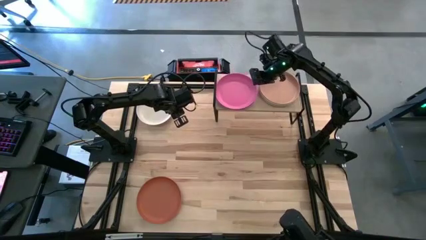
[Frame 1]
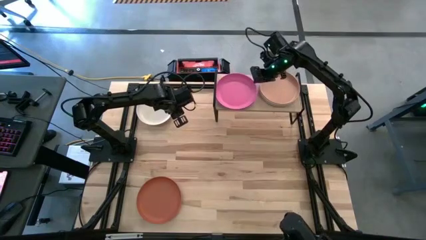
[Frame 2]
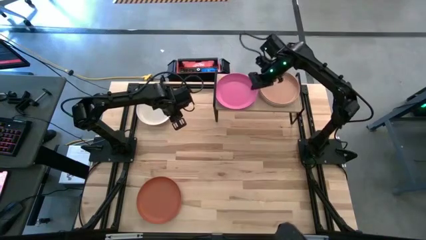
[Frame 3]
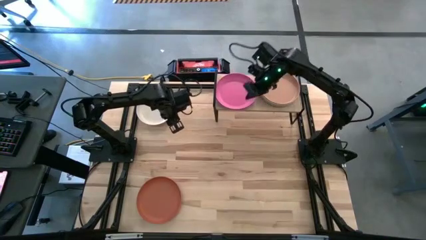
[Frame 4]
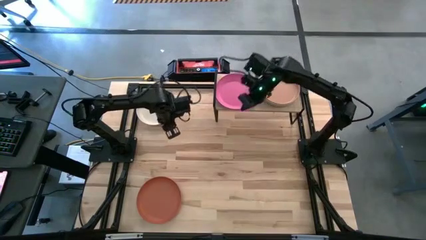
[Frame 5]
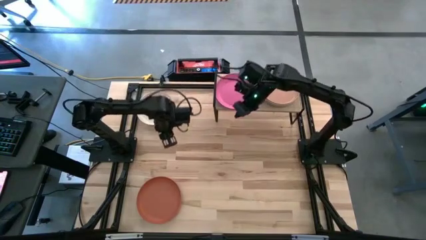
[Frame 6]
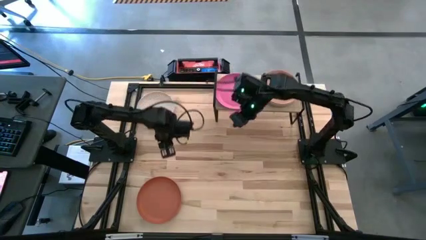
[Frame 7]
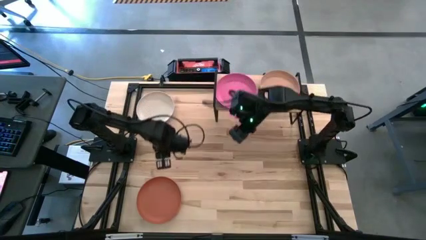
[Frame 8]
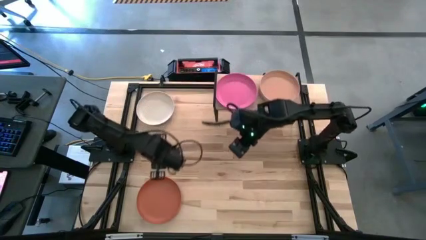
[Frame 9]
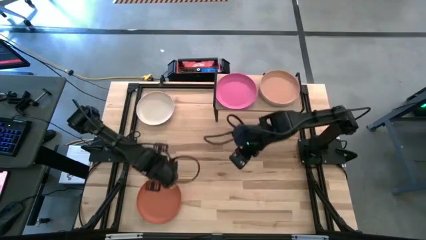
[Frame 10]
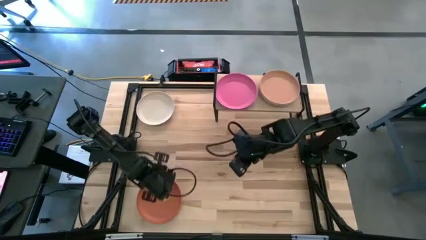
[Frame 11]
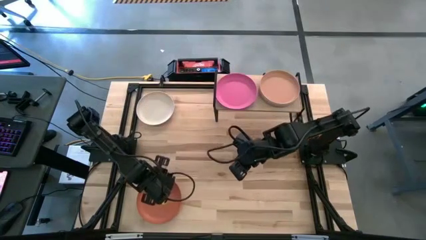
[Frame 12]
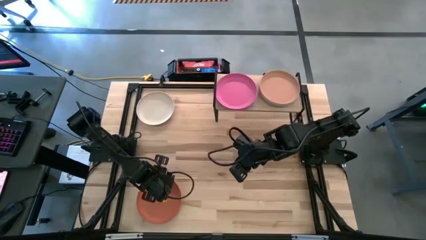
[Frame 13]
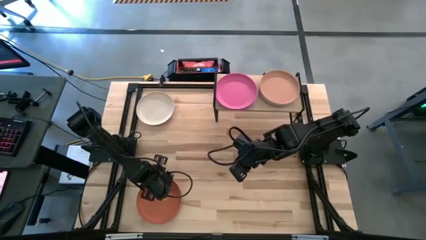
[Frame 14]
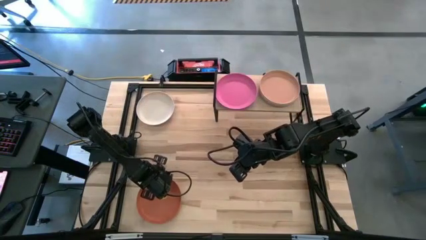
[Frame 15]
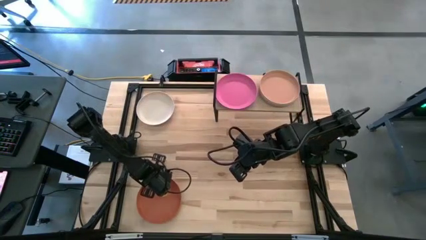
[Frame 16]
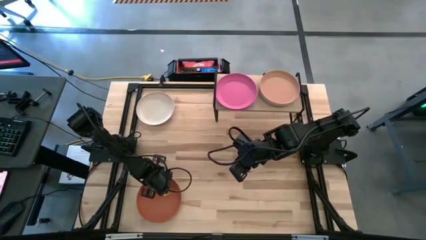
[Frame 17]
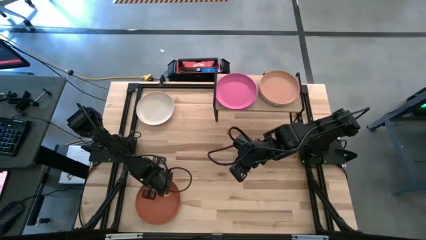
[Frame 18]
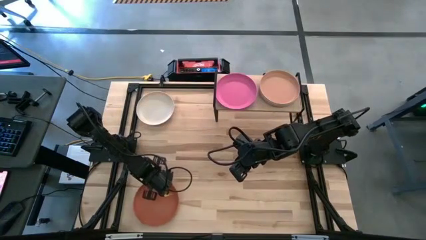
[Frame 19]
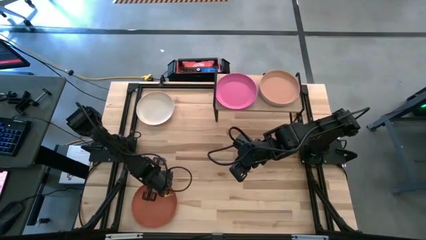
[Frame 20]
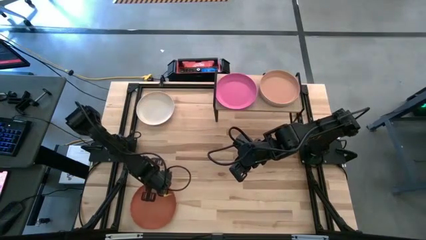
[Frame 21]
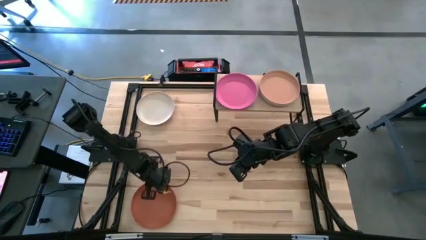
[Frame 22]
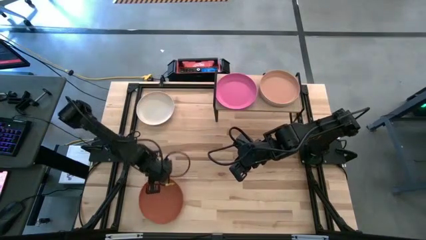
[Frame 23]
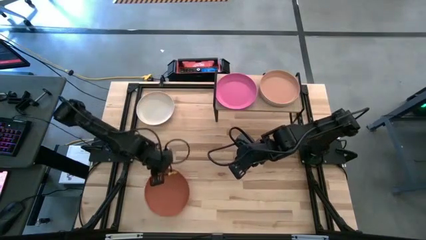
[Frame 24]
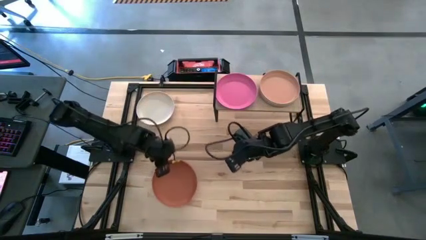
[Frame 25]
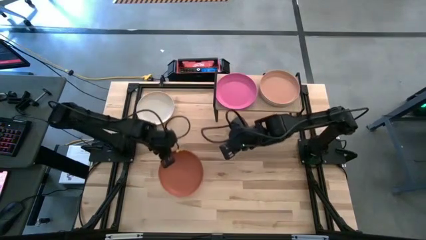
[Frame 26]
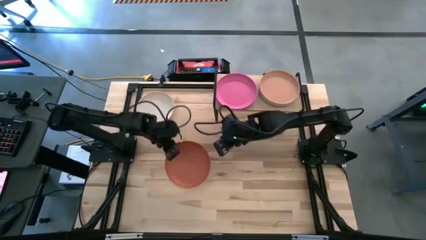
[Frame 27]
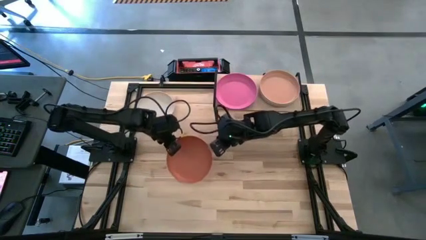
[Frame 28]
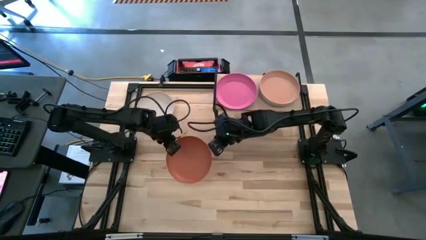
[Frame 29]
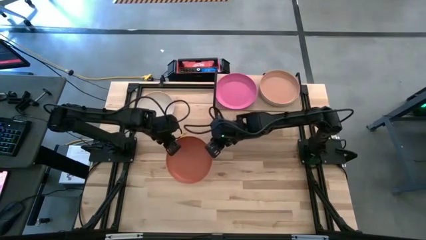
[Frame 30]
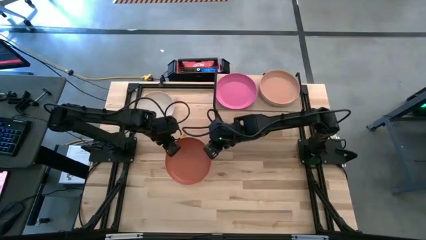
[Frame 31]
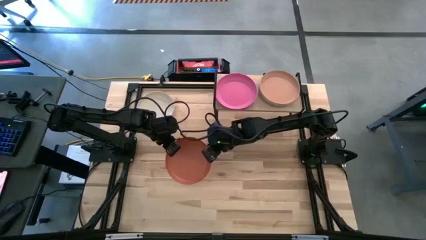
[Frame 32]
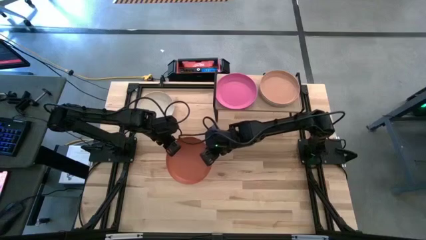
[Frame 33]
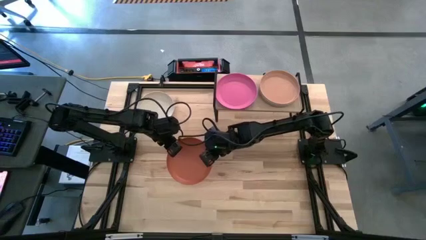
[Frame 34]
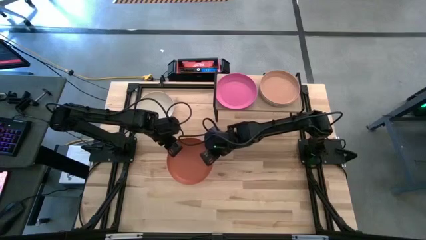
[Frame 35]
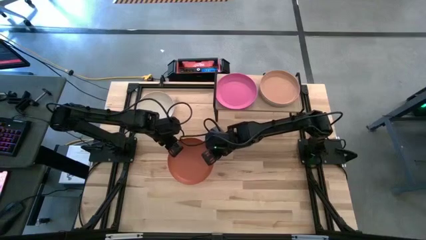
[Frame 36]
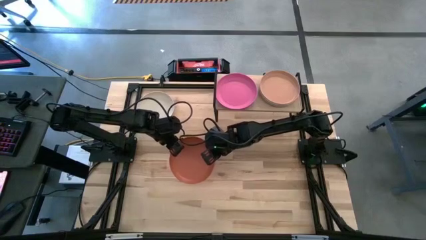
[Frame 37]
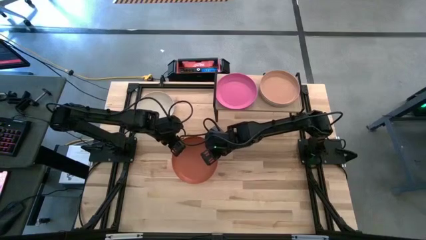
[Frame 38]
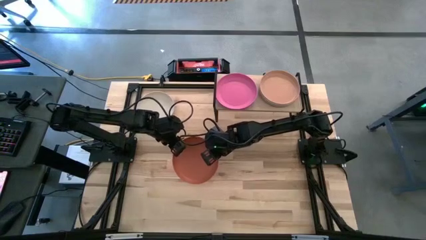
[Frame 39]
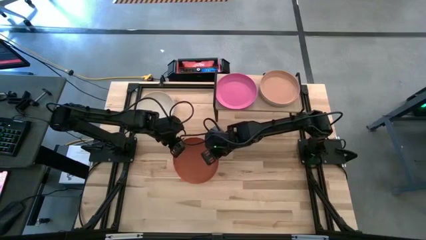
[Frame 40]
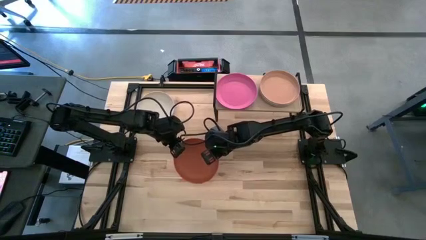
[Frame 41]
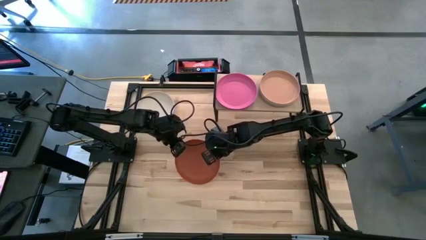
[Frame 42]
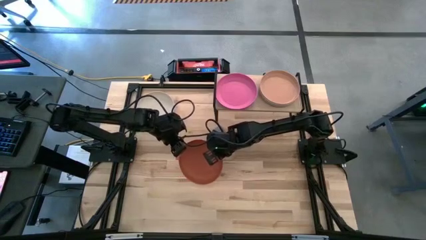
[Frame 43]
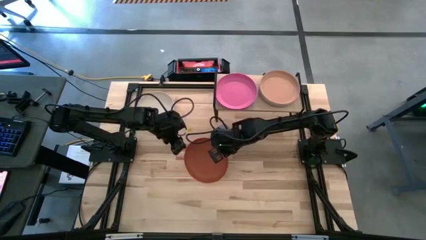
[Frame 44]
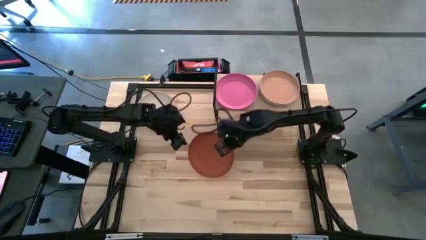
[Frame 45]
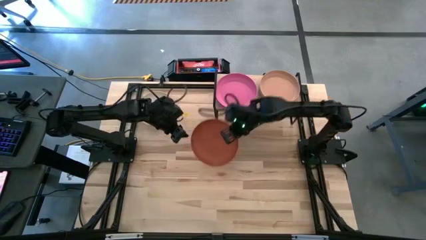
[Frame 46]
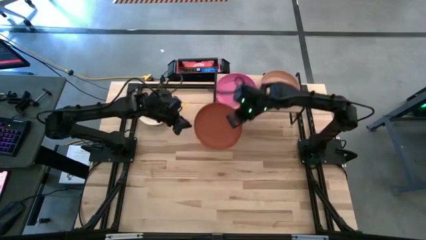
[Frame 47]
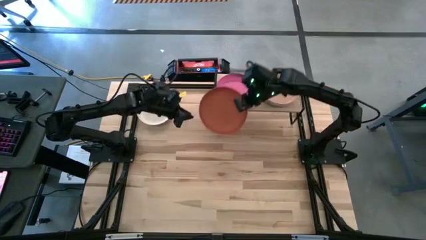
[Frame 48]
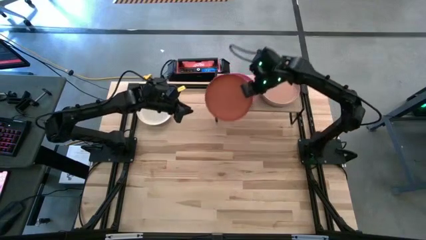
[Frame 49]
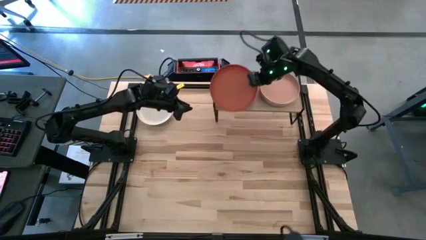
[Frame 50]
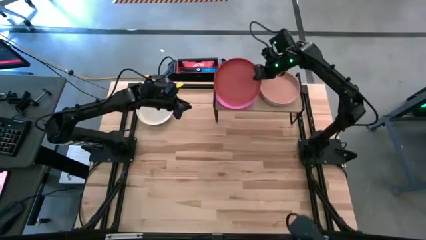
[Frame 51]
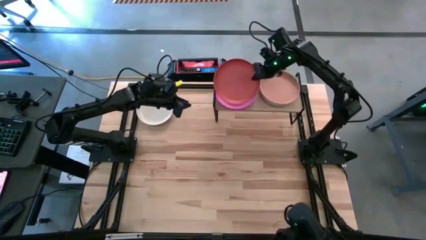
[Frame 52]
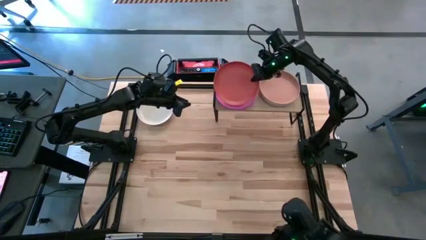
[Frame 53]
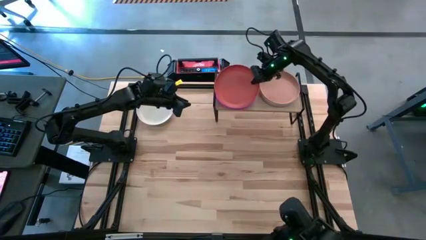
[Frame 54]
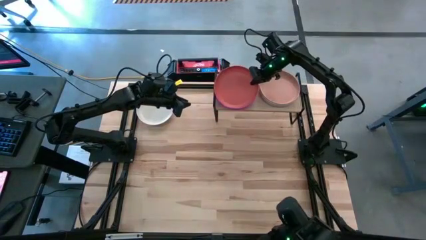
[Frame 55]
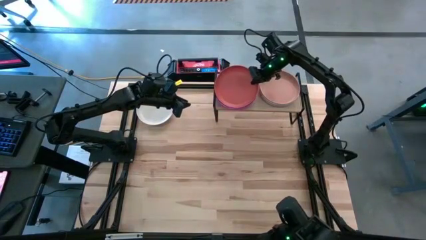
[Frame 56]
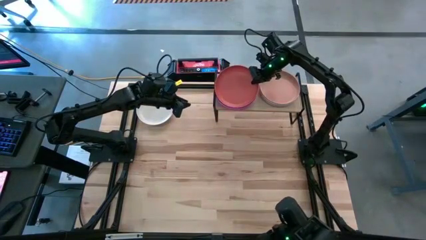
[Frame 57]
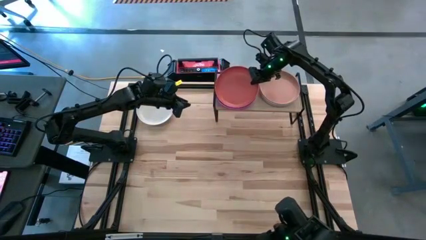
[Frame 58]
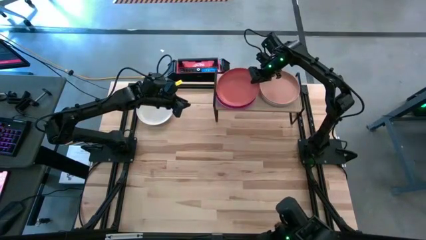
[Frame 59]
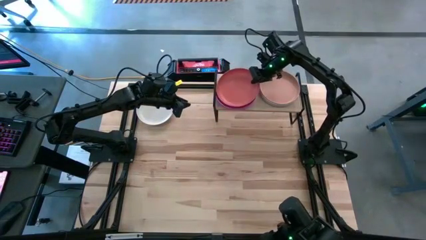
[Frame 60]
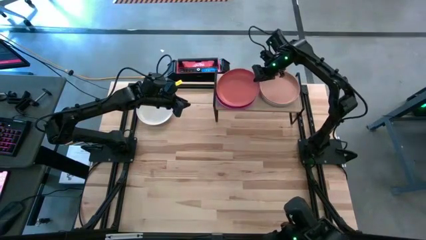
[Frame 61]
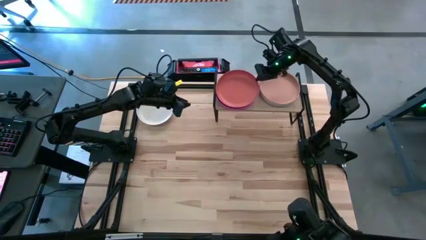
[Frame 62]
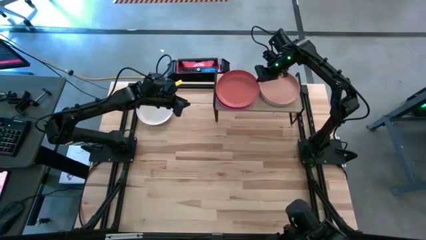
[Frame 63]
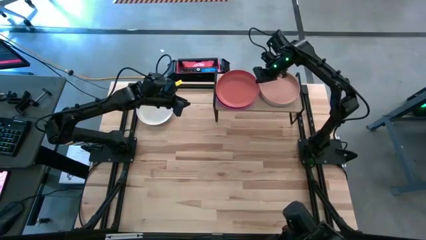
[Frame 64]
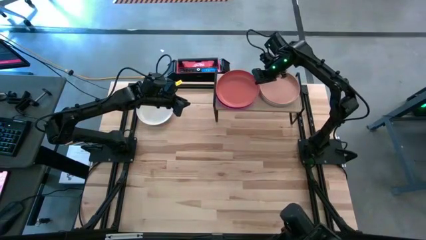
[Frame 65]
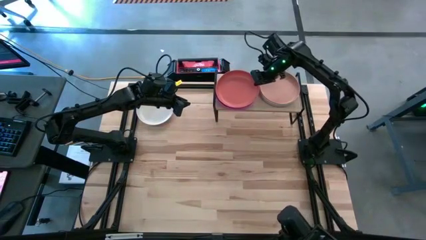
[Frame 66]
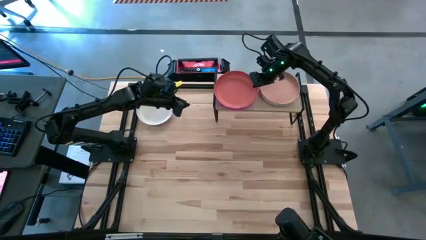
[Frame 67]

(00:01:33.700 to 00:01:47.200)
Task: Place and stack plates onto a shelf
Stack the dark orange plate on top of the pink stacked plates on the shelf

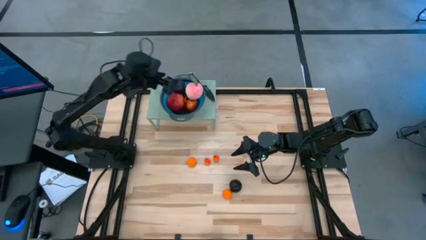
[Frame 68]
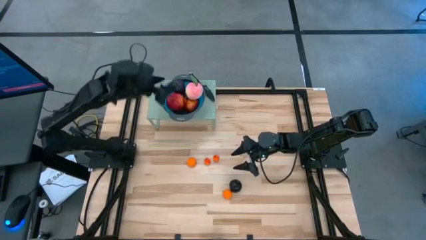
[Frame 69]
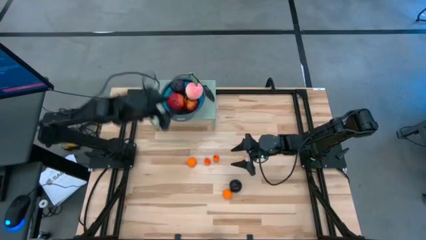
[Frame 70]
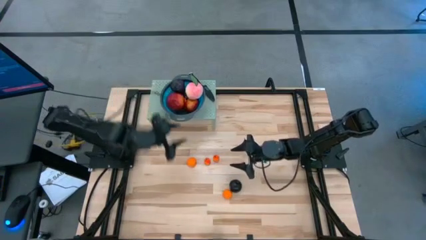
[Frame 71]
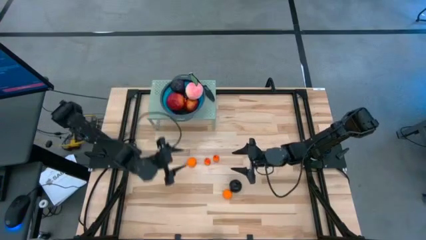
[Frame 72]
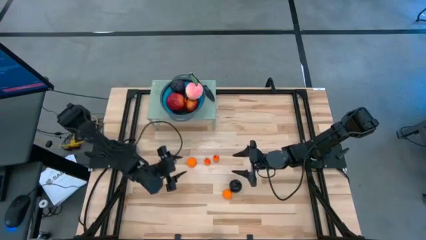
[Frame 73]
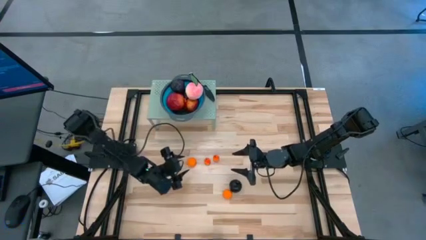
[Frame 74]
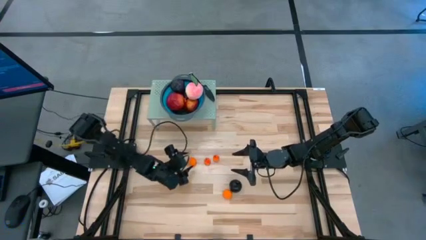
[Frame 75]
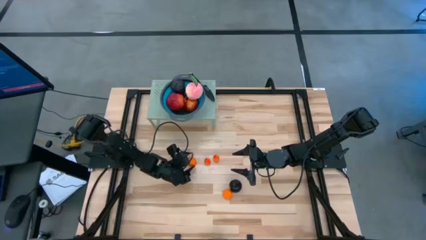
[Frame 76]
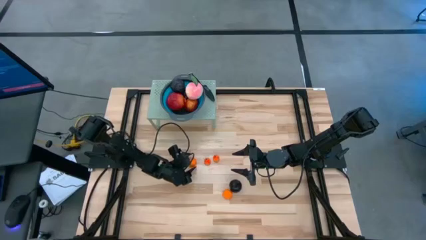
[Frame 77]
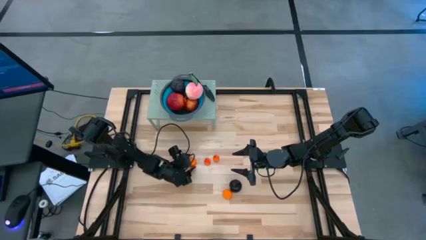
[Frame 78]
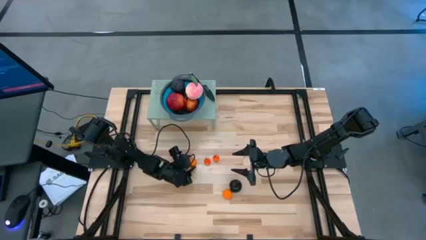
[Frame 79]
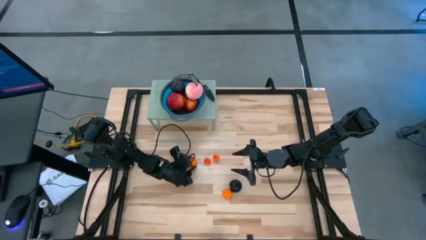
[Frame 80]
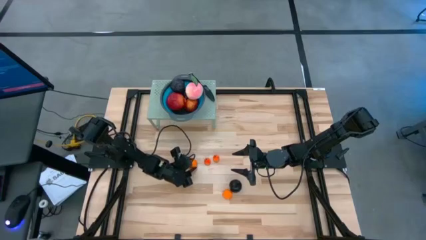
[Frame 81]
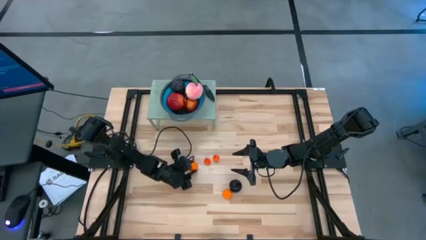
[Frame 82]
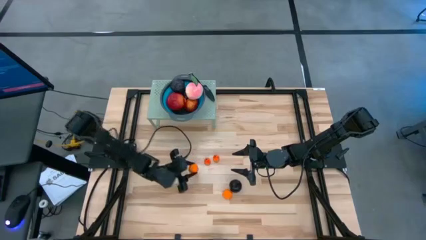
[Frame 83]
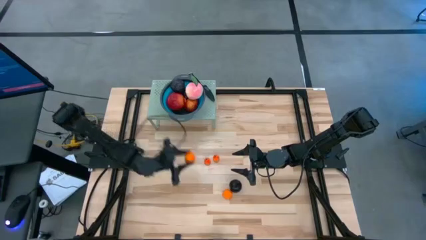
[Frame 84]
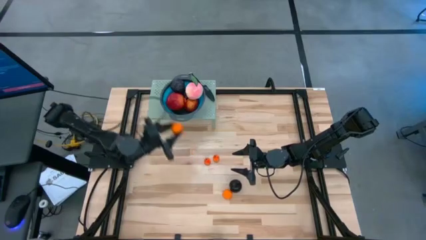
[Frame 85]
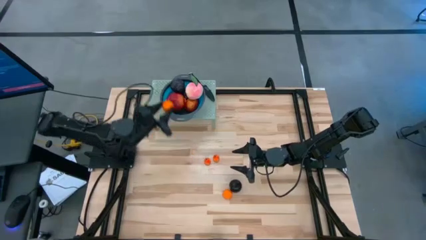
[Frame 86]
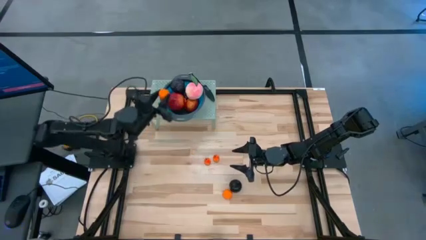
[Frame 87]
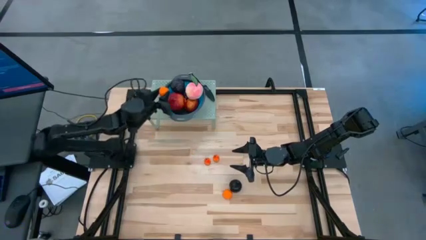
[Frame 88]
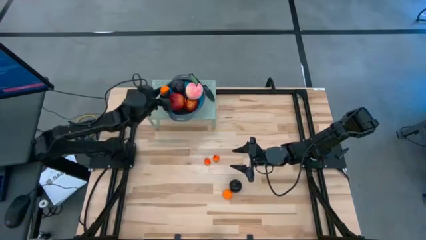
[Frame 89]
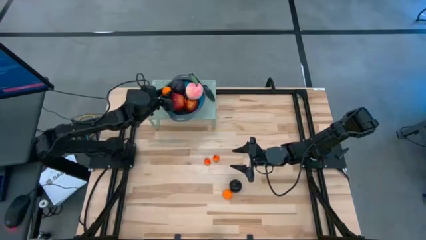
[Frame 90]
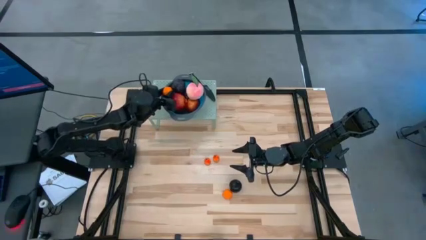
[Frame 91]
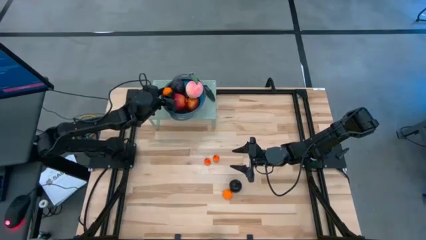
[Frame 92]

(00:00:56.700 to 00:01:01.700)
Task: Pick & Place Fruit
Put the top orange into the blue strainer bowl on the shelf
